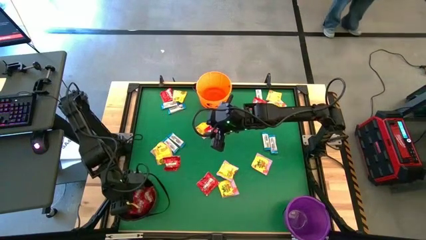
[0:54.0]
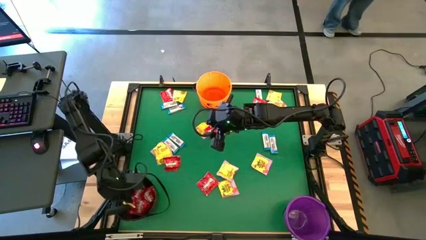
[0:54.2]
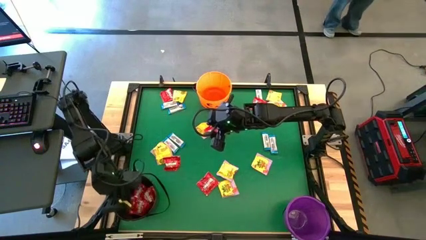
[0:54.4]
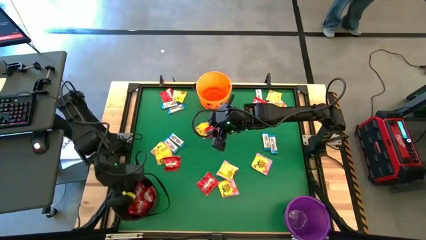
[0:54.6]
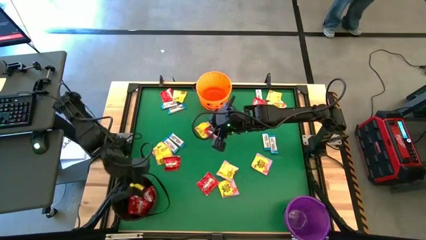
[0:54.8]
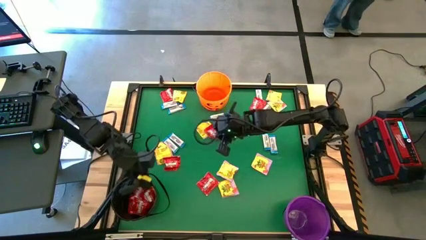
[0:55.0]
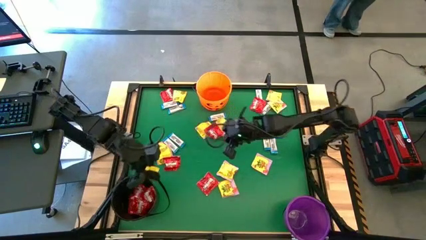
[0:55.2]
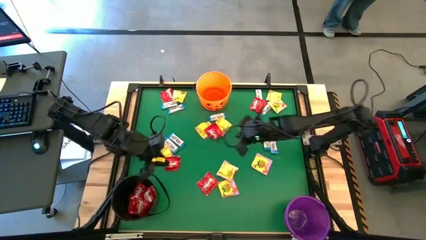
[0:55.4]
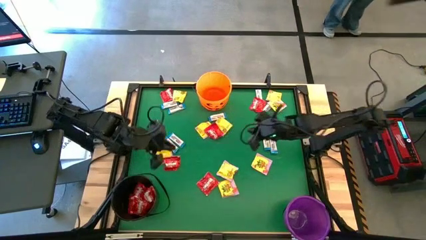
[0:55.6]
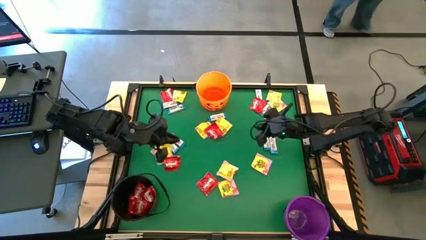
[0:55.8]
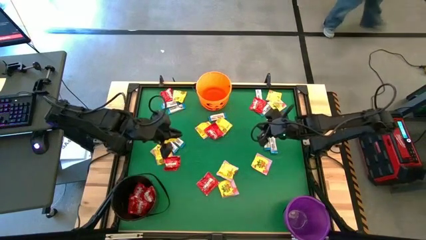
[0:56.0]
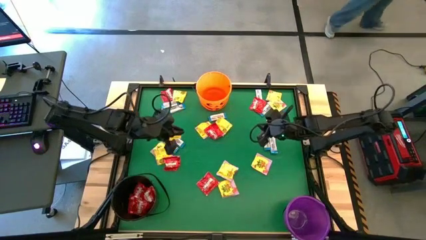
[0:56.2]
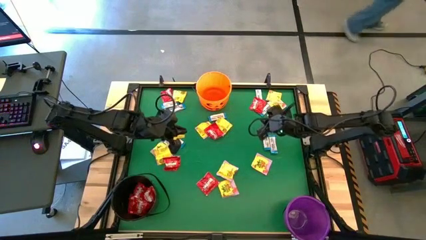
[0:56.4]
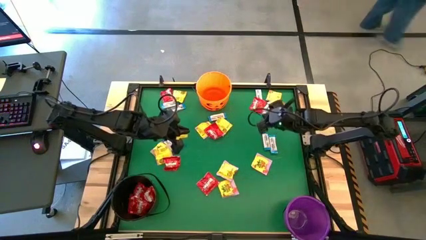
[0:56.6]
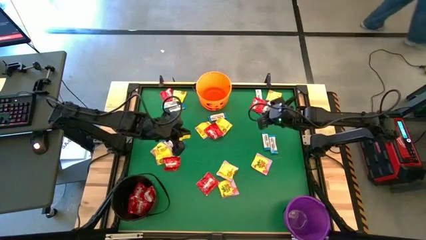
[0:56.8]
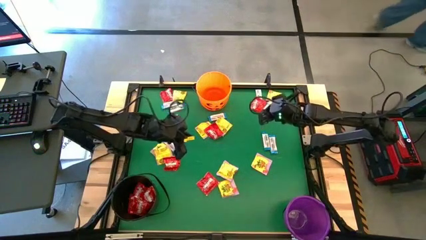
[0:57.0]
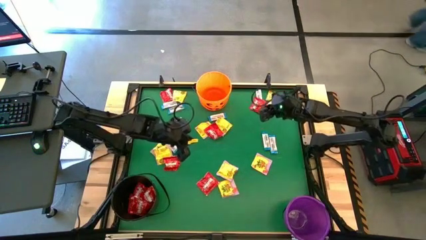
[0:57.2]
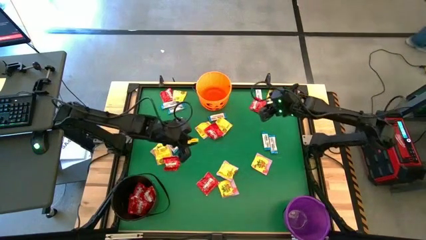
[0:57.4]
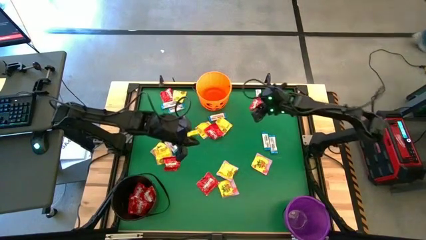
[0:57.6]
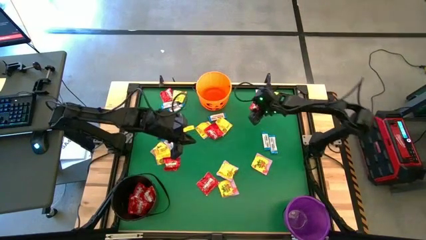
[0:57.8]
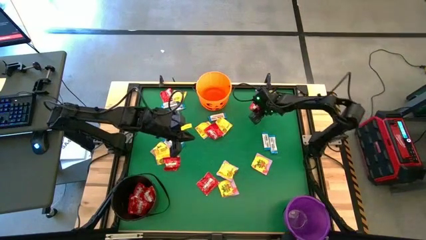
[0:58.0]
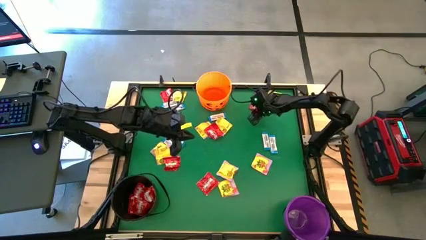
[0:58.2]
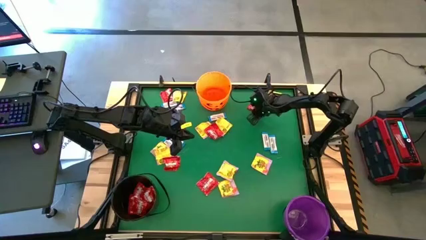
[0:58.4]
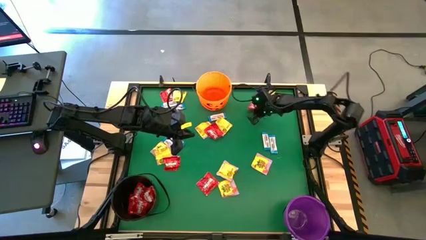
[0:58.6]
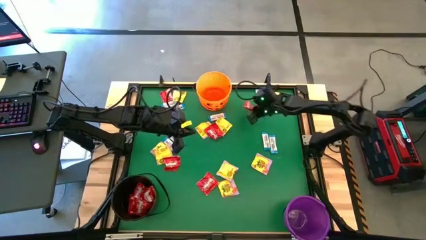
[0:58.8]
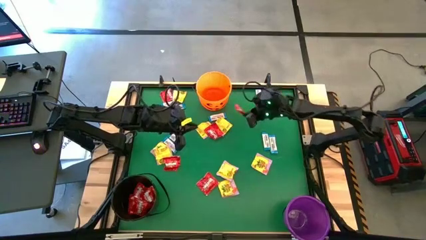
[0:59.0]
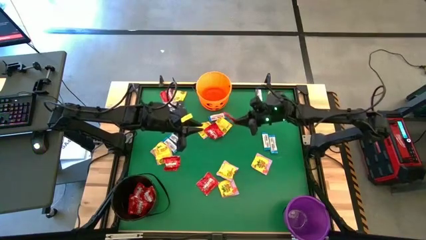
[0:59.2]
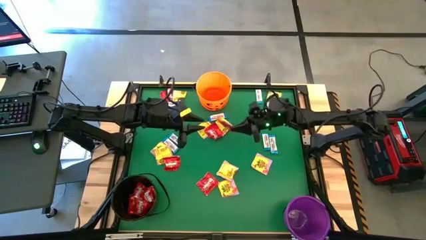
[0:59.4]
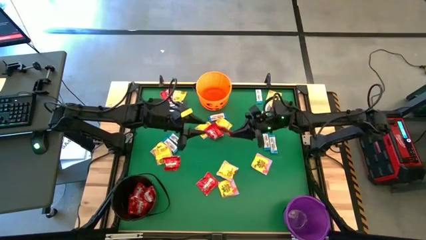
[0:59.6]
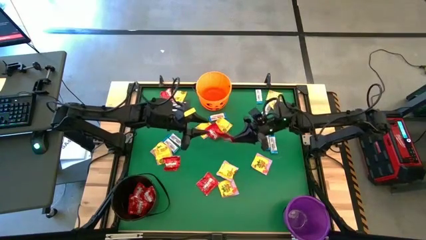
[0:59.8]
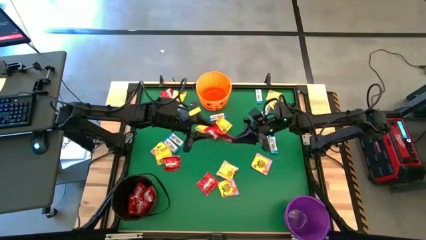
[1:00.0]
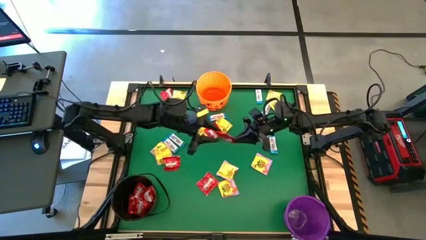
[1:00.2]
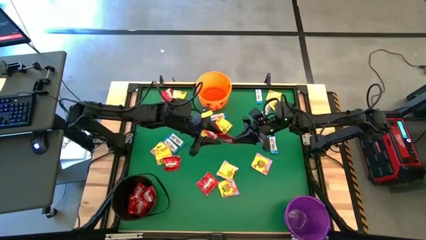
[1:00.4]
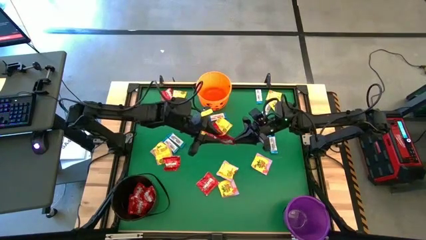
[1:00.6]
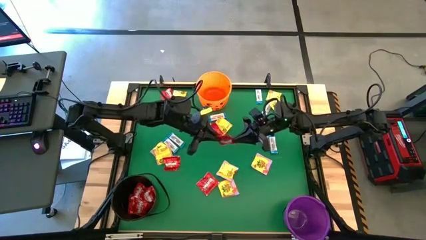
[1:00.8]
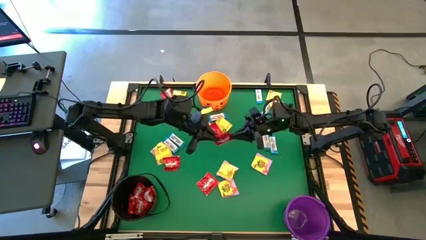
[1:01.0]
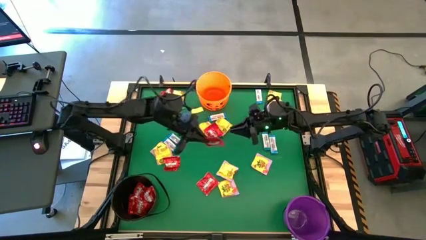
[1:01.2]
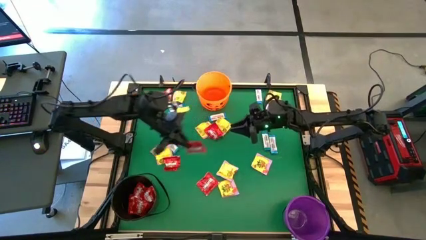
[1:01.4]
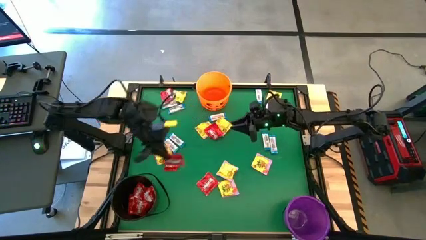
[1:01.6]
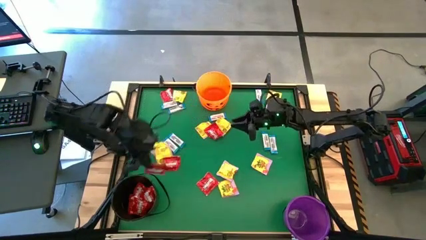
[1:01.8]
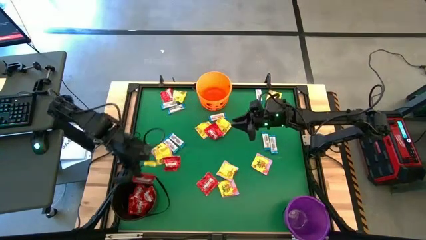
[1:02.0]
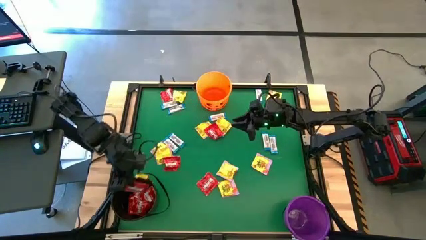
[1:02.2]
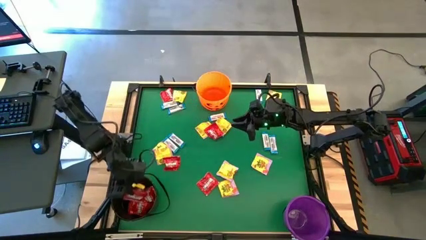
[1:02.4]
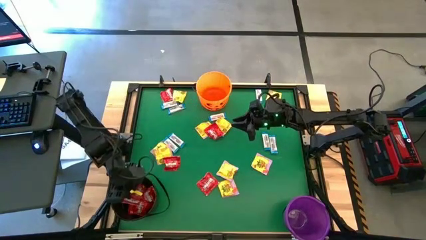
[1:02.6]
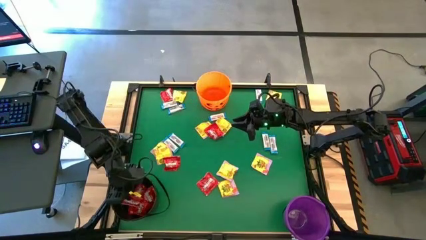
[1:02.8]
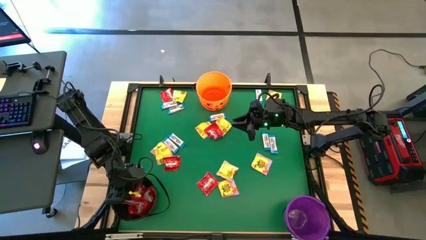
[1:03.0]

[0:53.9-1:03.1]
Task: Sort candy by brand, put in halloween buckets
Put the red candy into the black bucket

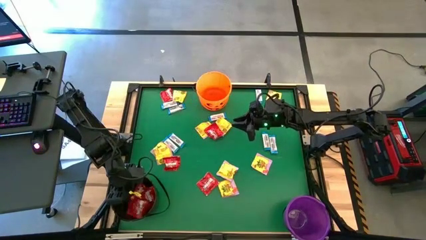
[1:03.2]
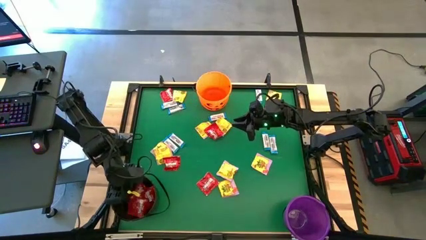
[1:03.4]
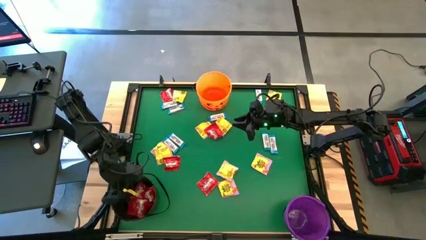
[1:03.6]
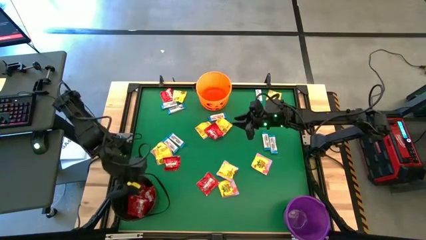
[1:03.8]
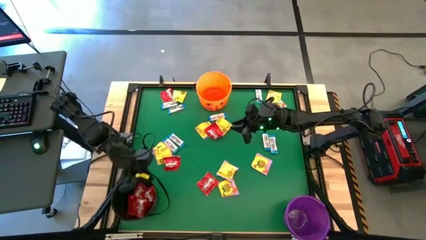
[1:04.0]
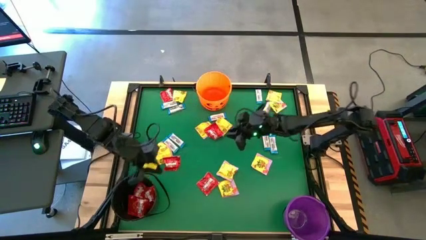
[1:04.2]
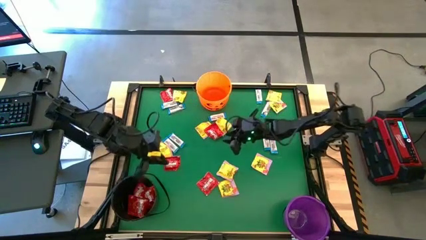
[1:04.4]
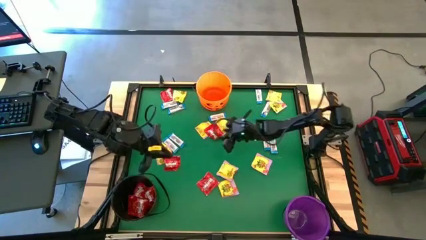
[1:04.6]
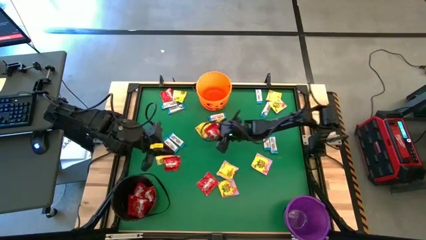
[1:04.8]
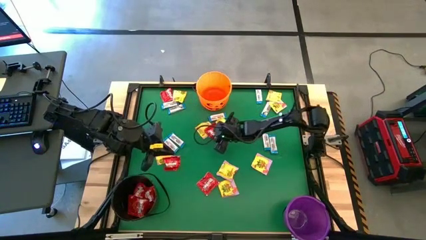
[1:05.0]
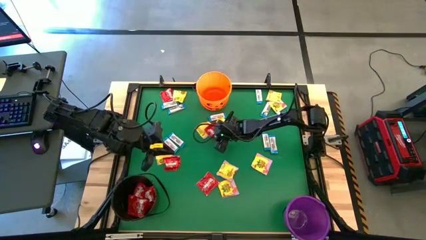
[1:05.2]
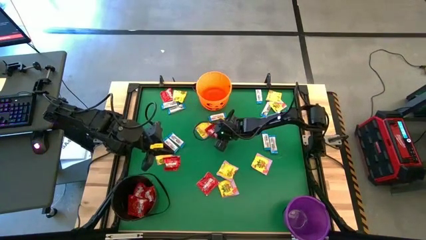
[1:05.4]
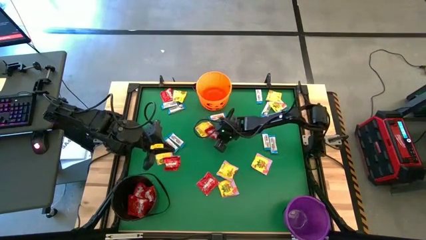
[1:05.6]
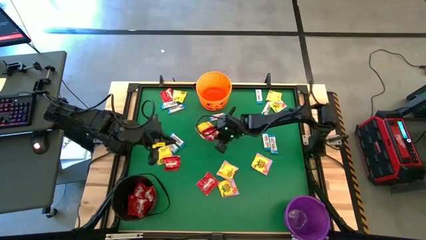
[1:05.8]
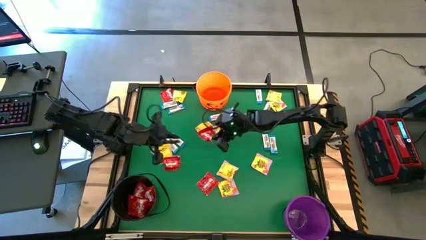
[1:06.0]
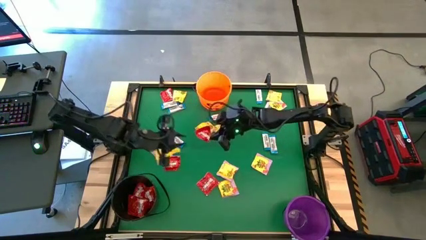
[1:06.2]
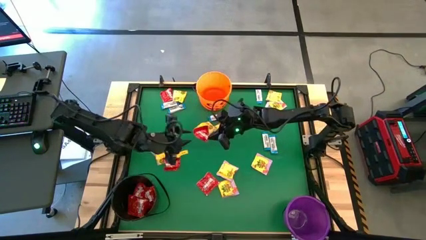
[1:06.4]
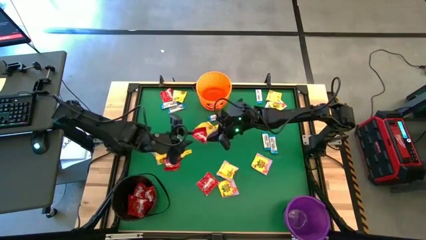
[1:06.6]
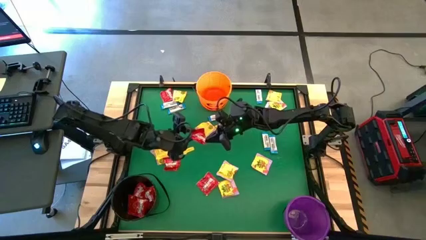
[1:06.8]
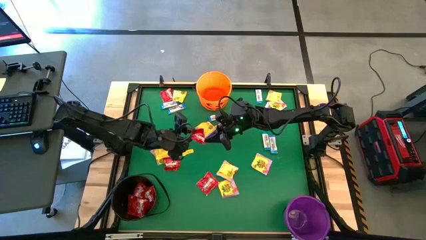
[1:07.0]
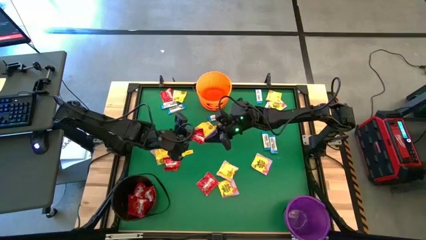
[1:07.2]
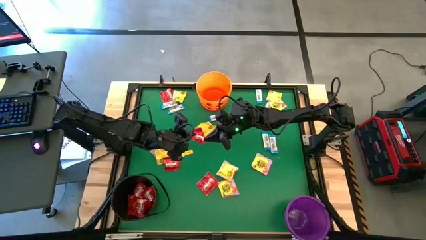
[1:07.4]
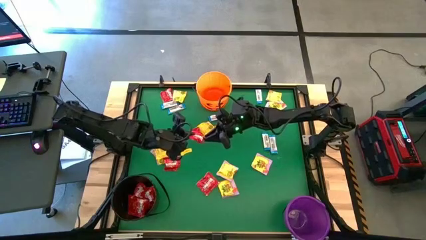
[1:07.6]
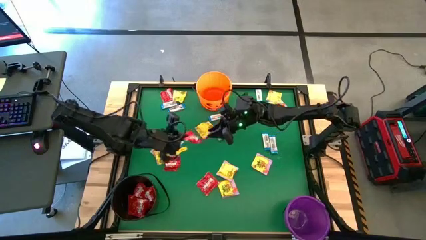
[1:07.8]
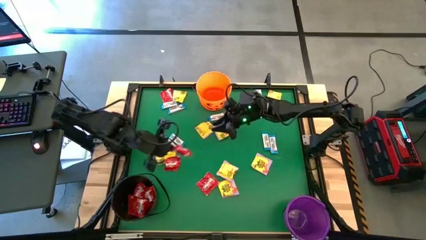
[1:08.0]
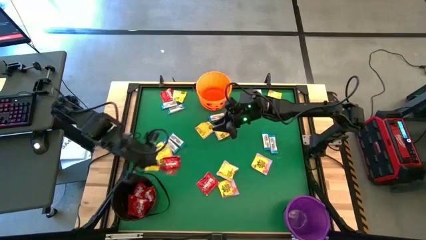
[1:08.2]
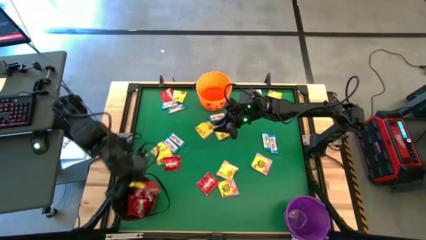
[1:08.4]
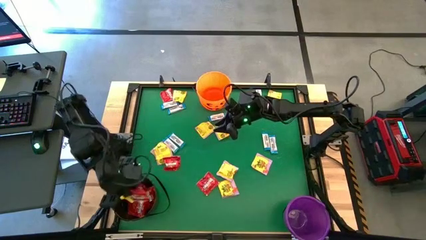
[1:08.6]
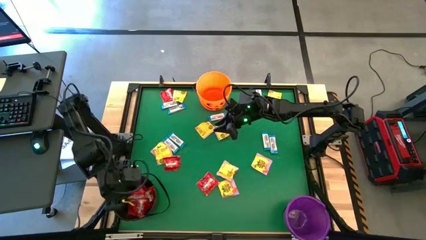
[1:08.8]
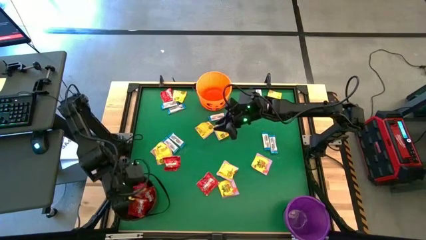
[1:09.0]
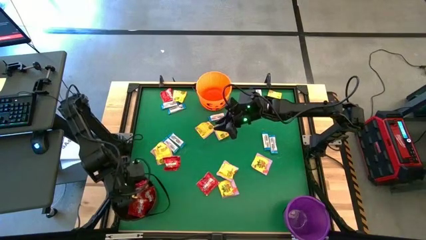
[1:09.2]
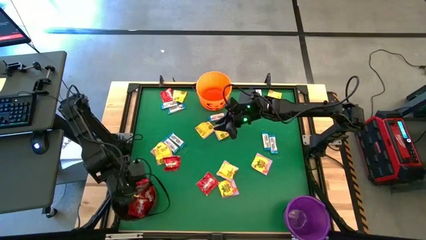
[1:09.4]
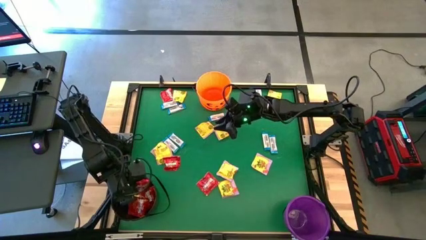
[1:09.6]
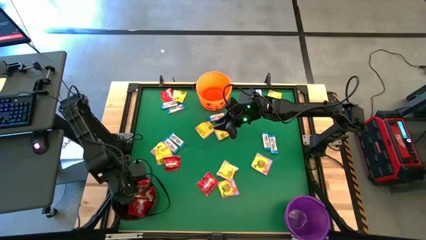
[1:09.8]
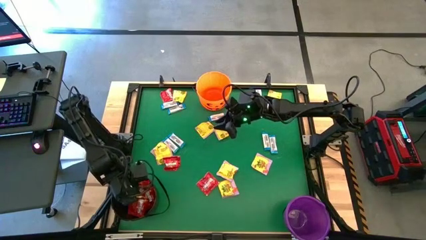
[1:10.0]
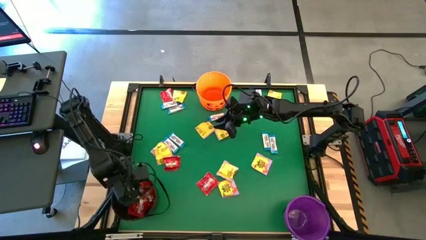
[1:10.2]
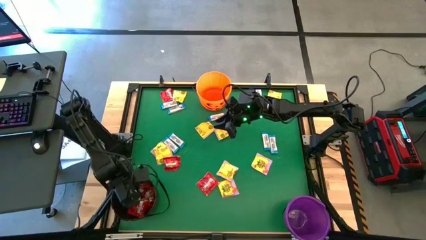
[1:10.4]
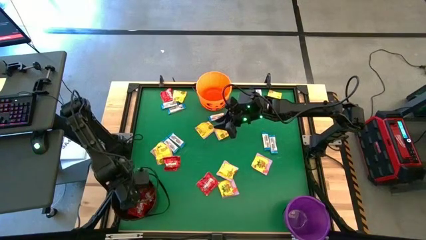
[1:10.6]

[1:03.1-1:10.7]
Put the red candy into the black bucket
